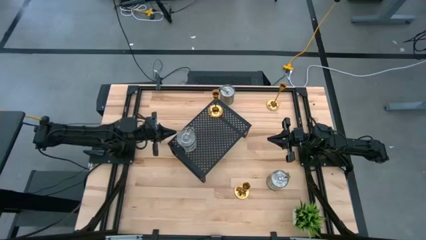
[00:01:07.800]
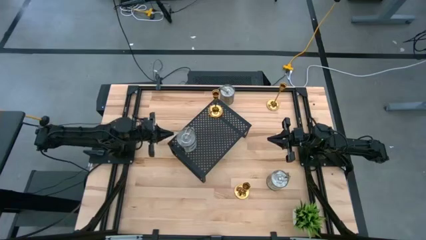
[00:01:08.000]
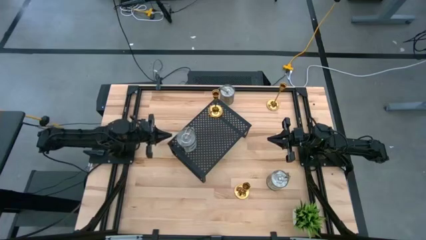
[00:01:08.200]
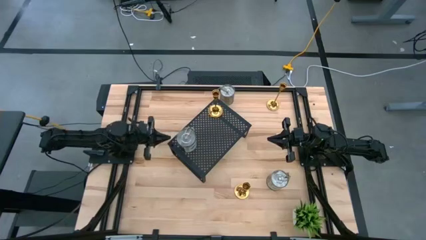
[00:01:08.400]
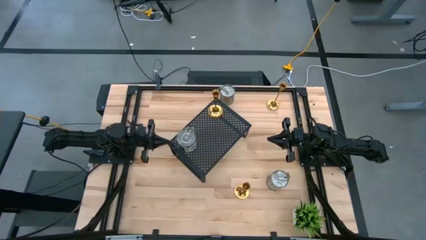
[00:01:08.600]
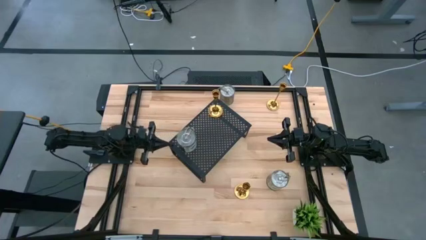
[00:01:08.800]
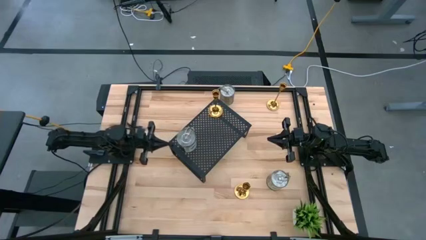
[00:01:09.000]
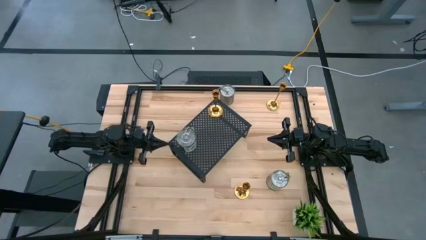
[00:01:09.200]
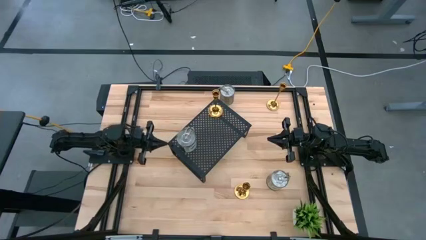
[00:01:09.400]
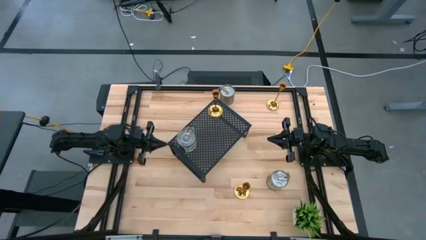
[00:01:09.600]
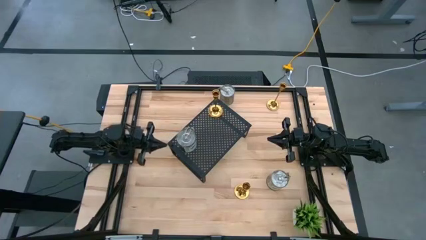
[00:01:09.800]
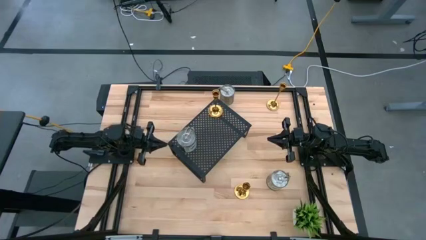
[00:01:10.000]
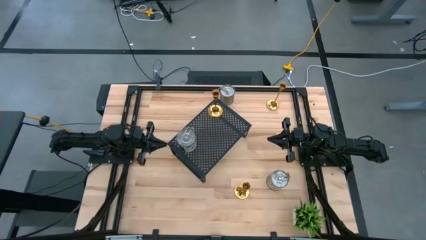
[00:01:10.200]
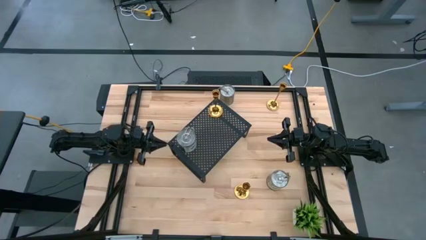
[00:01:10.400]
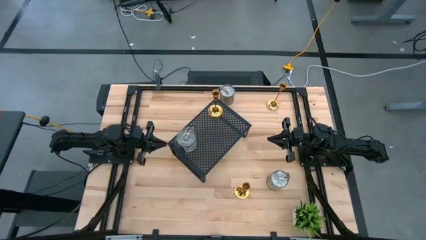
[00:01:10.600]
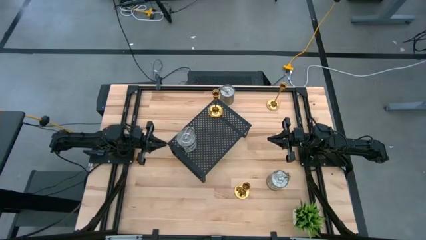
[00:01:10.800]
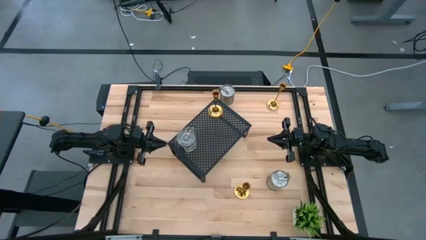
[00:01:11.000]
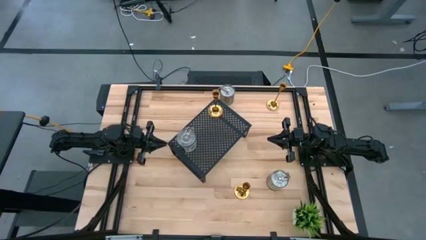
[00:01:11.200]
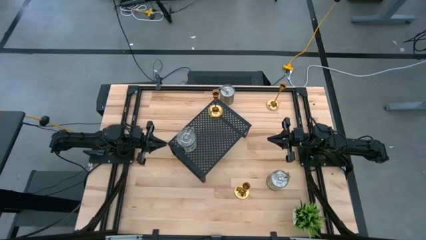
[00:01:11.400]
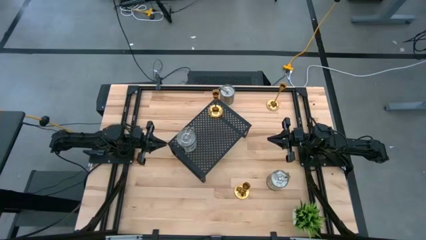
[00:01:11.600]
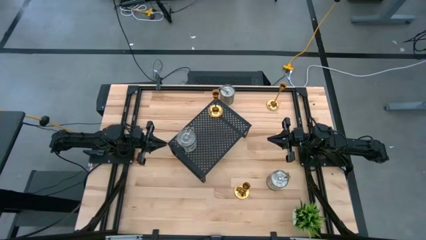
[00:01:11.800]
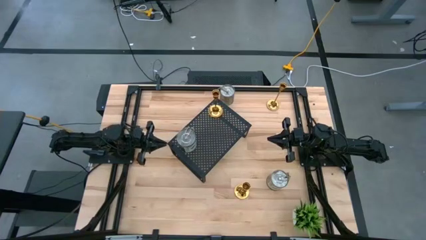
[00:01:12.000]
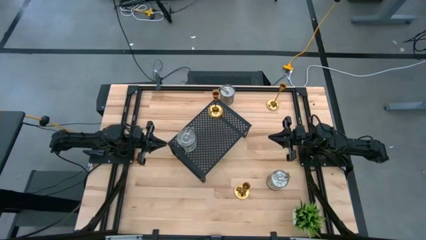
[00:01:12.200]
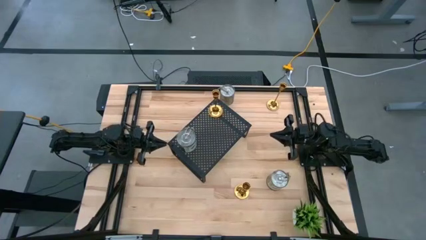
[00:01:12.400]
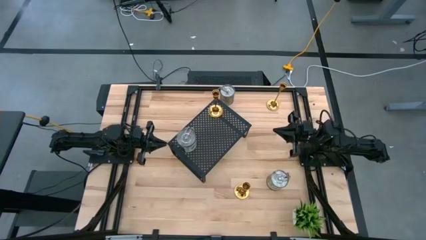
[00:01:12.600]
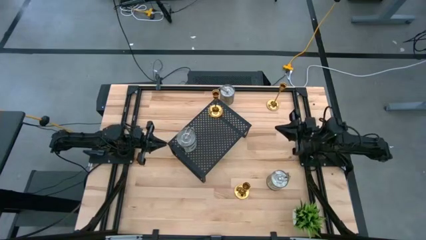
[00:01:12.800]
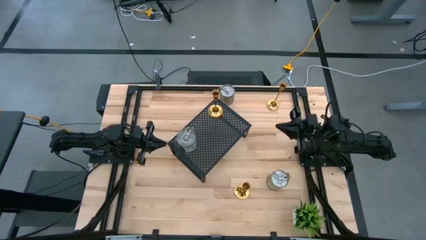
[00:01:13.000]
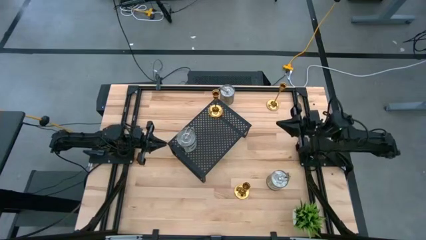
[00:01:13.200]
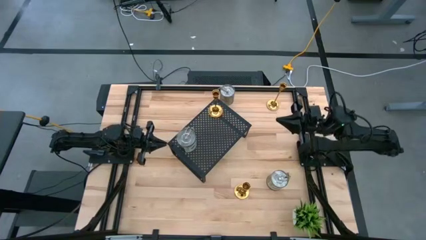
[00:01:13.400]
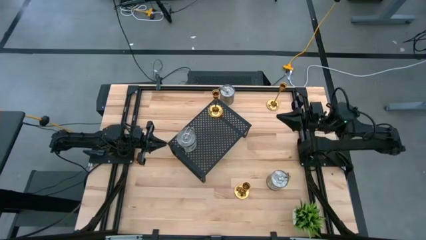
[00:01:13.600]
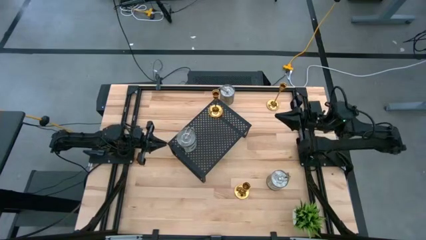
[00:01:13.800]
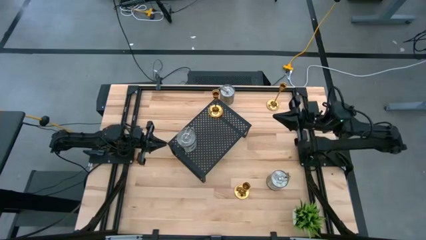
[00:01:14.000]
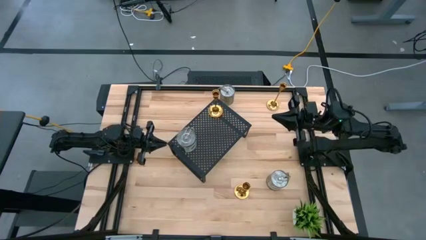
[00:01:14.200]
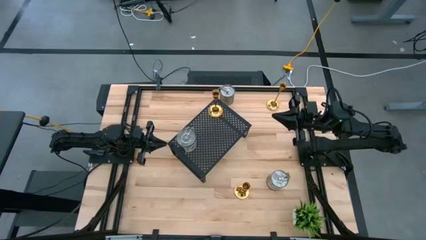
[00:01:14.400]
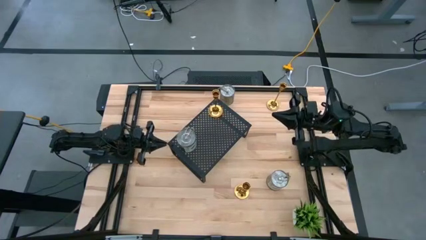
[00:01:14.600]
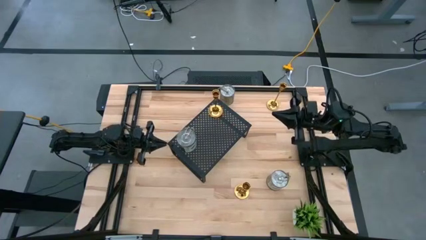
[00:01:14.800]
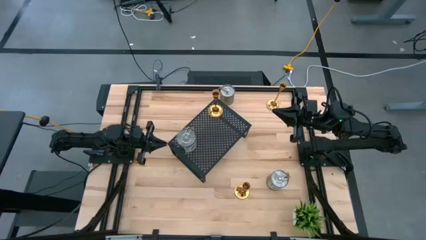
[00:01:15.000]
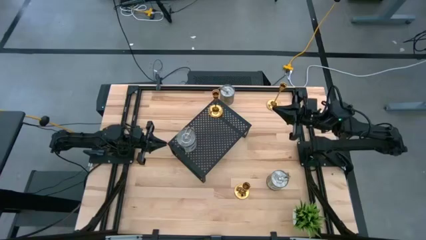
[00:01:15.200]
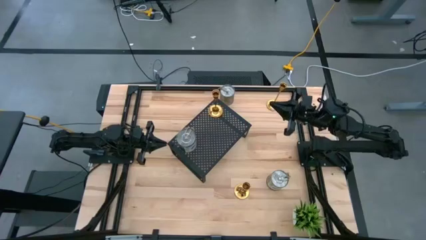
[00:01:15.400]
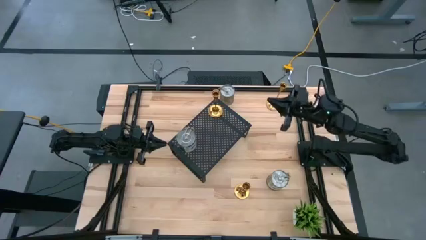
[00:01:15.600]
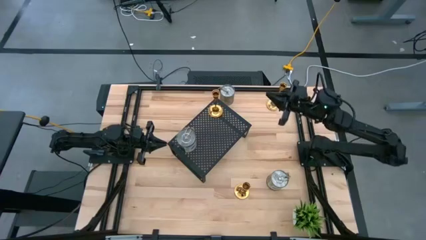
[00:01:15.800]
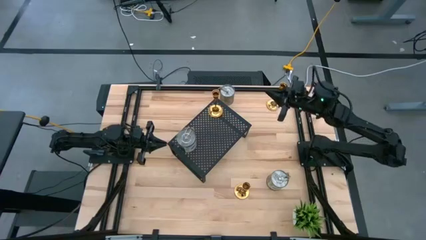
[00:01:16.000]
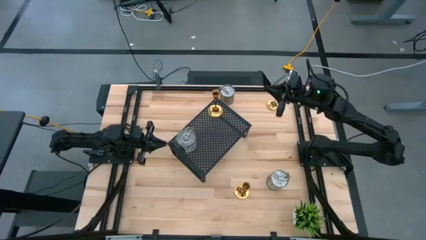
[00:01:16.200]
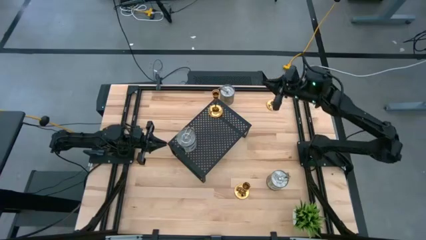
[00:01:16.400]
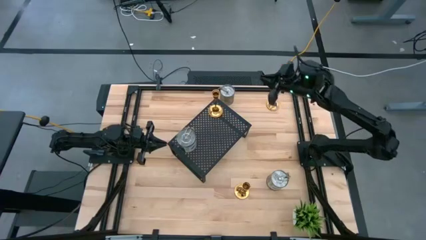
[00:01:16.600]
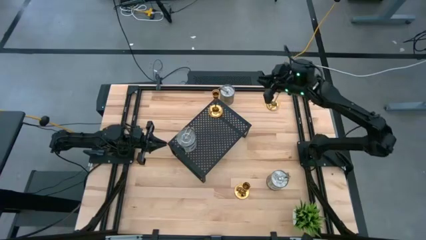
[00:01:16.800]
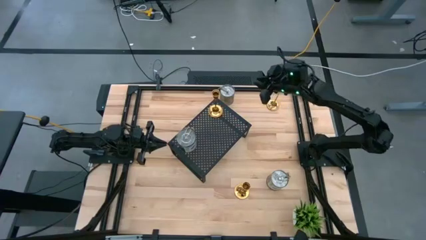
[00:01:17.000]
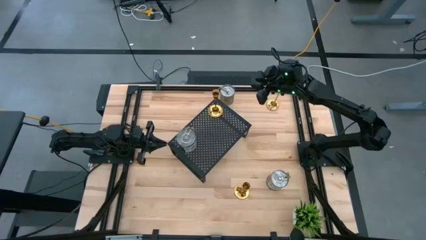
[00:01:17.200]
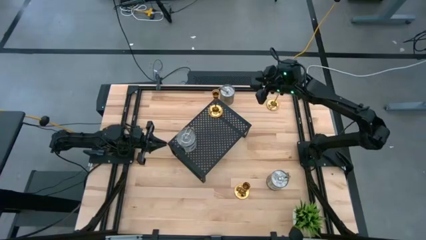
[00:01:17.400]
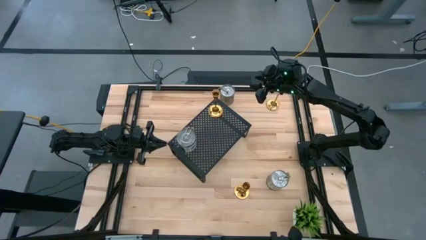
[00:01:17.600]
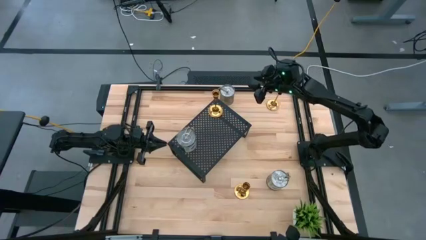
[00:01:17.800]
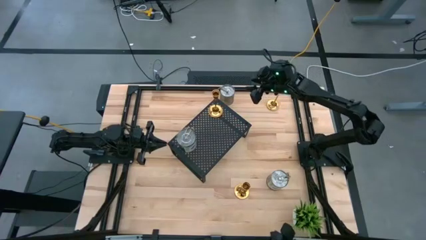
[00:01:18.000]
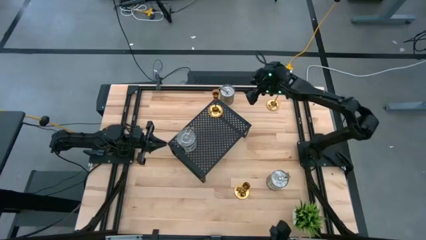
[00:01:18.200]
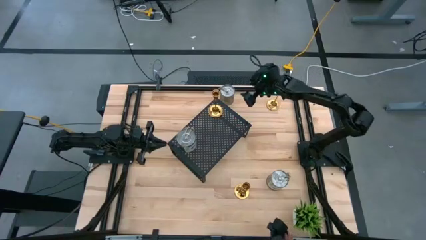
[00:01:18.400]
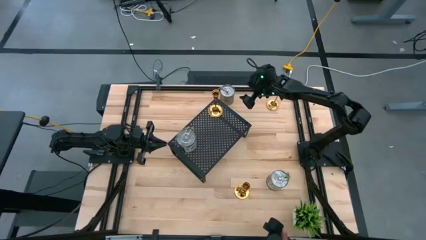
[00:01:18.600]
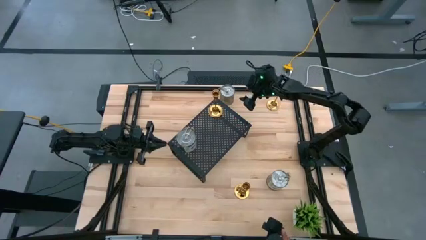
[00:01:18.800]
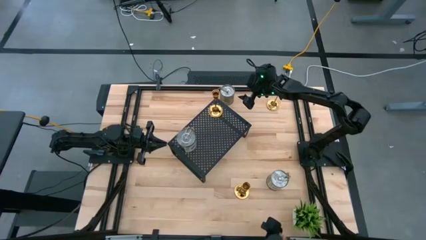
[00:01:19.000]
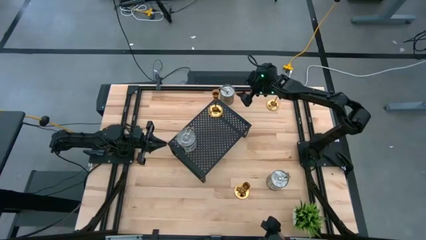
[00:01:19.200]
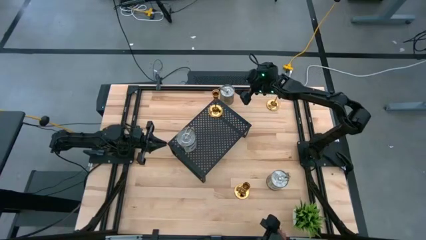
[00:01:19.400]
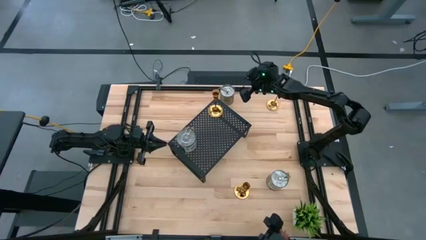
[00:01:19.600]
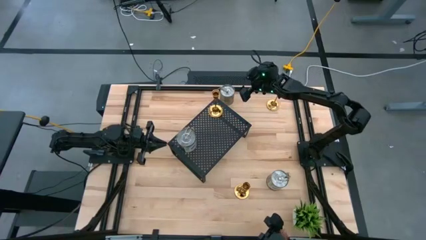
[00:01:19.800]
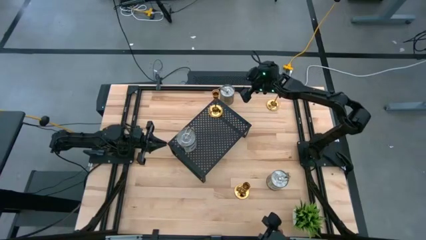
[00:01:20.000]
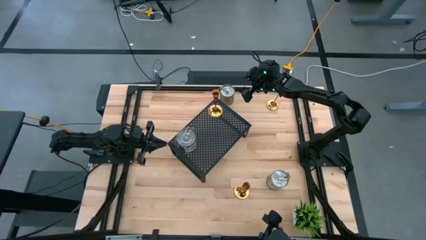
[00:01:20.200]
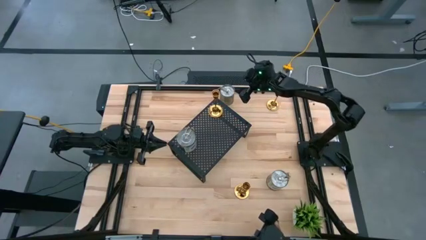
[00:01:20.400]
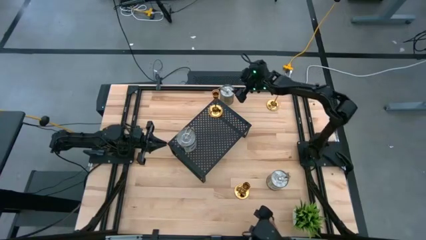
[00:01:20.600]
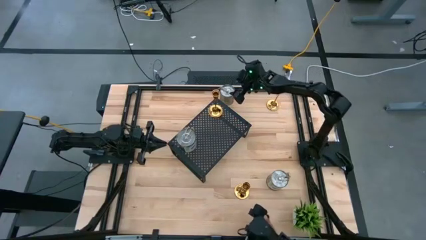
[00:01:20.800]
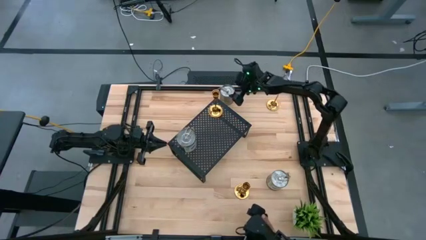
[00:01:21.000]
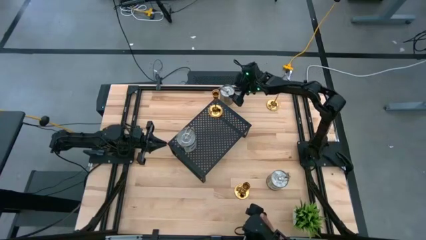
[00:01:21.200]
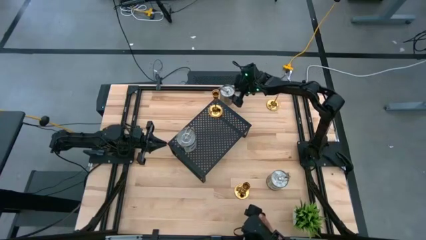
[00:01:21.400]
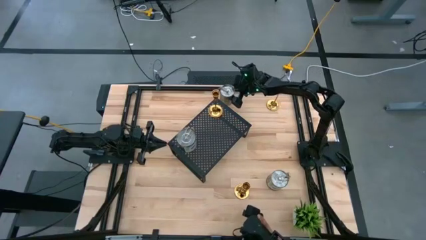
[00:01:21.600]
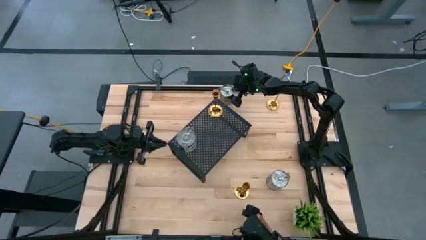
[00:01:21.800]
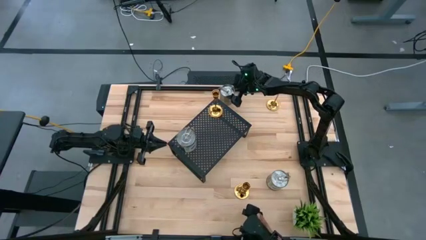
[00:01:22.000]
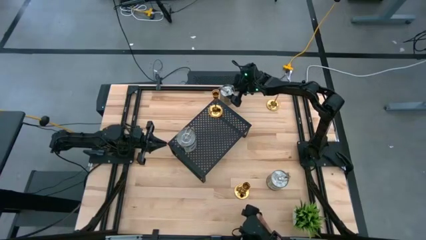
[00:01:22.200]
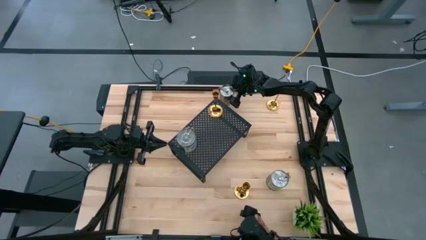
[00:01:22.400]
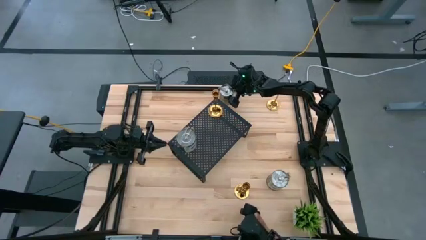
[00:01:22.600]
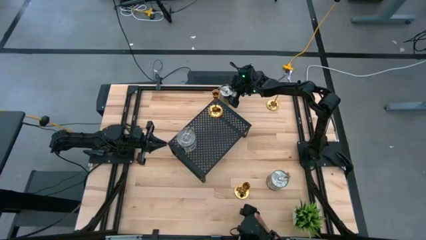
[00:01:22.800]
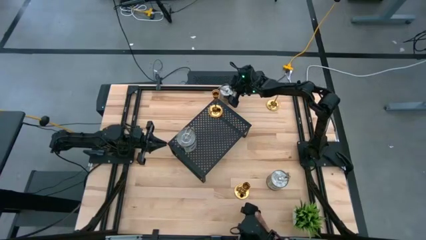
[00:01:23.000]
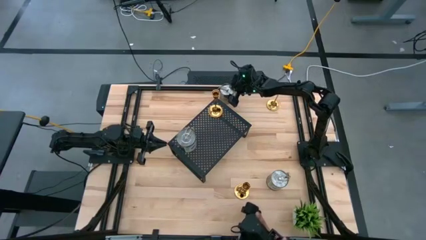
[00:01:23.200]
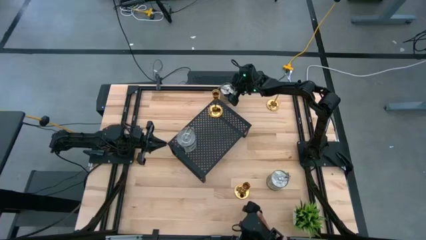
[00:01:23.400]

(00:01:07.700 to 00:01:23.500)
Task: Pick & Place candle stick holders
Put the top silver scented candle on the shelf aligned with the other silver scented candle
